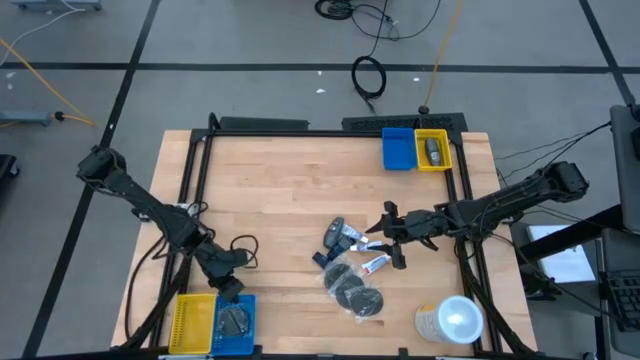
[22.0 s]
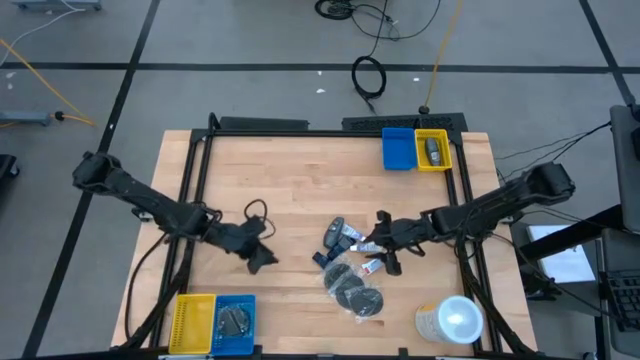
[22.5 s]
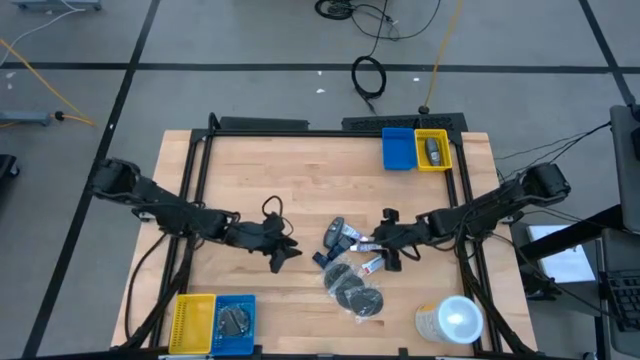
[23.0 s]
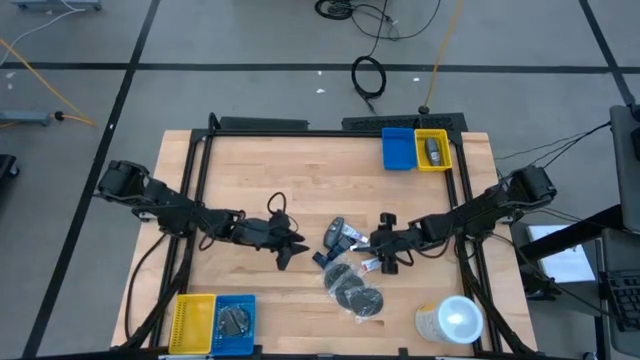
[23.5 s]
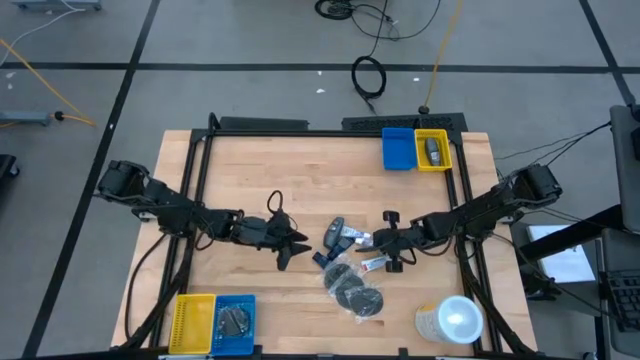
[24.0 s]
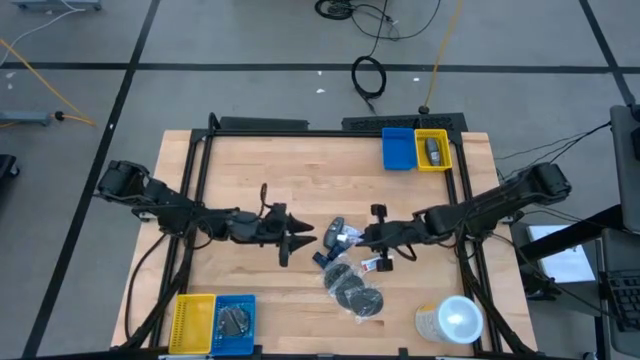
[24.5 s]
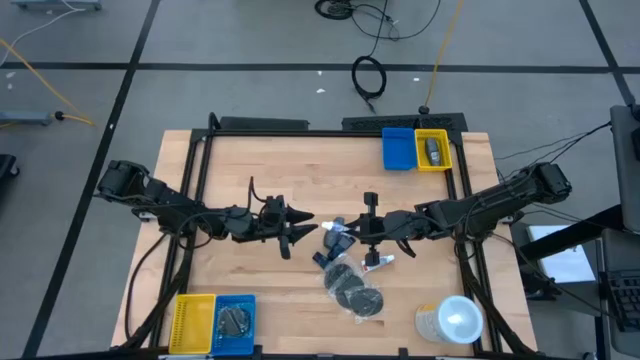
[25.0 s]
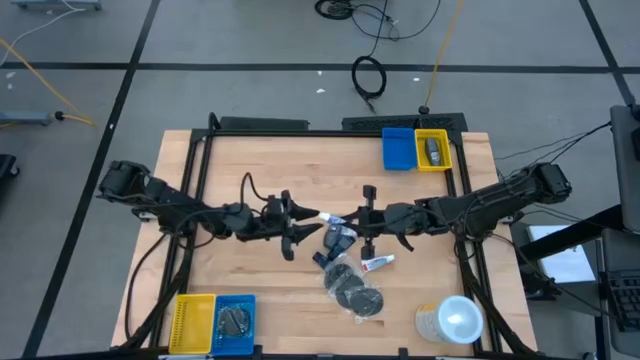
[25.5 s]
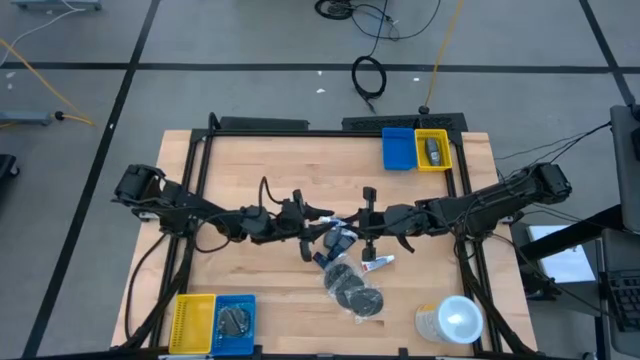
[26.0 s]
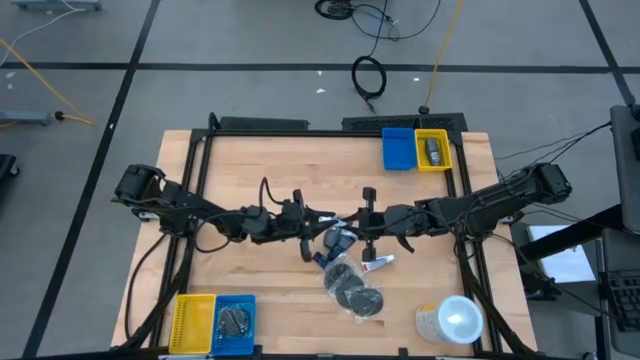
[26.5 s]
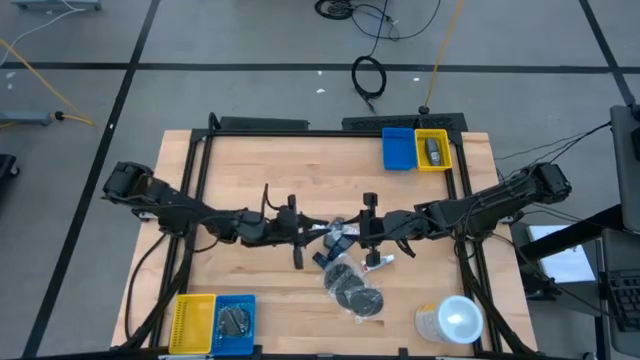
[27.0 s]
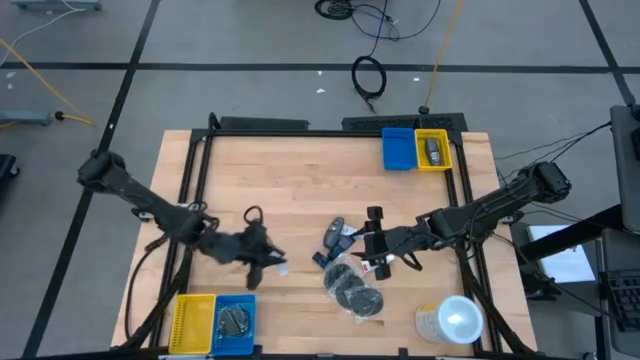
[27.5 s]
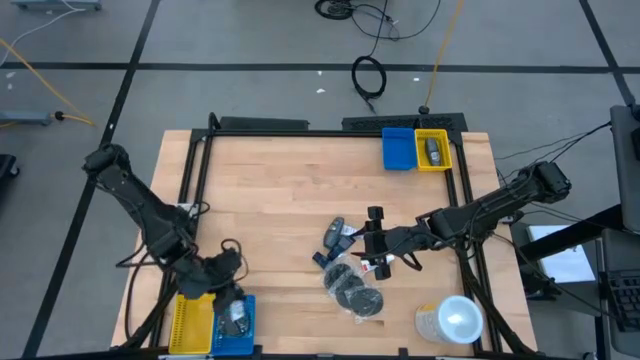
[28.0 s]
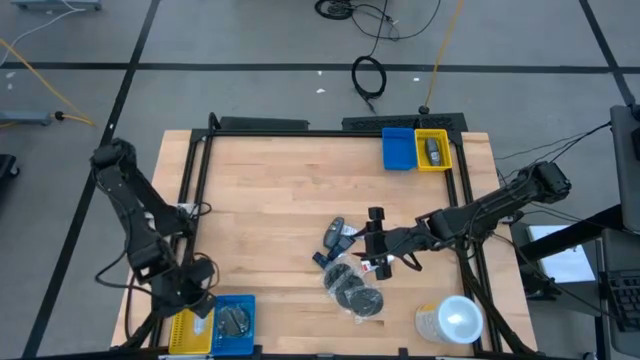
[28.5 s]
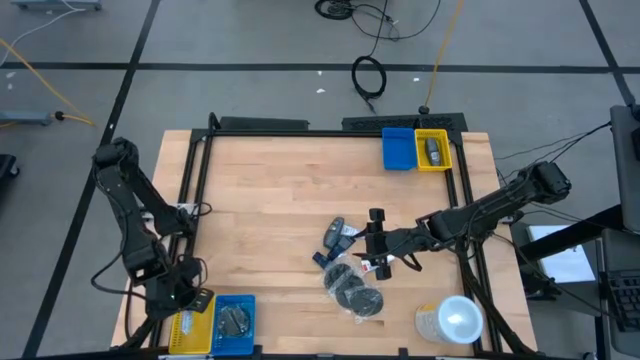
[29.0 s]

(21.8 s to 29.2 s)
Task: Pick & Place Travel size toiletries
Put the white toothpaste into the bottom yellow bin

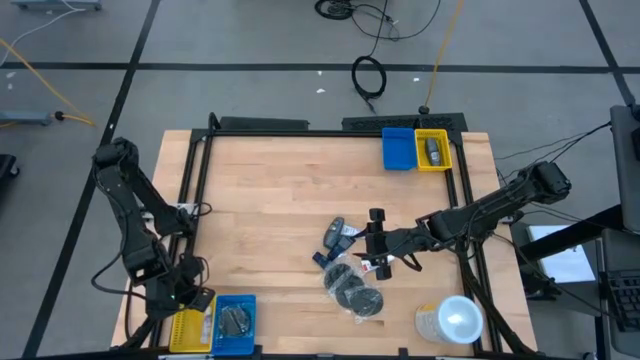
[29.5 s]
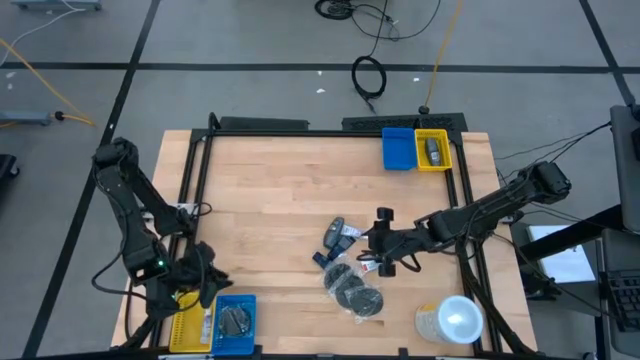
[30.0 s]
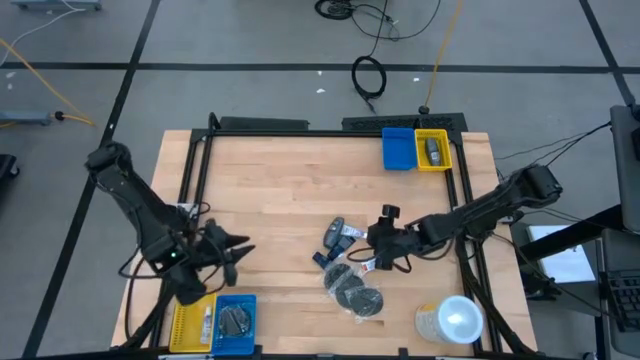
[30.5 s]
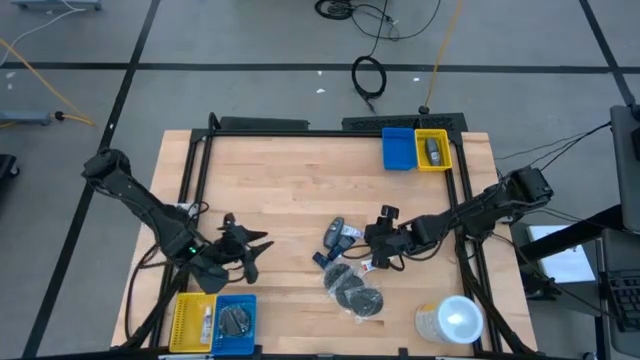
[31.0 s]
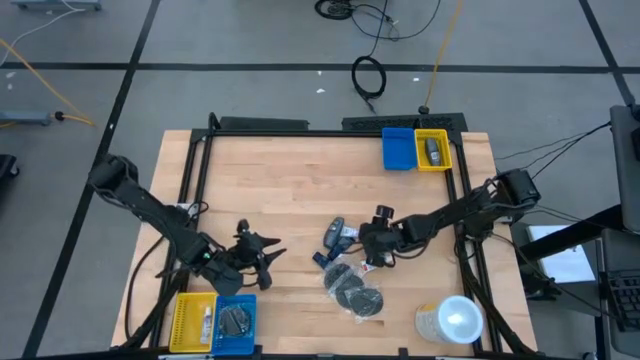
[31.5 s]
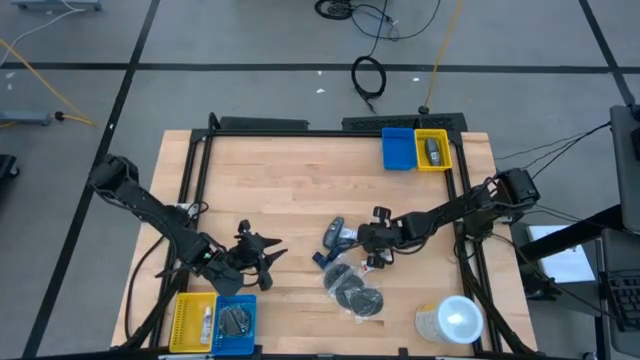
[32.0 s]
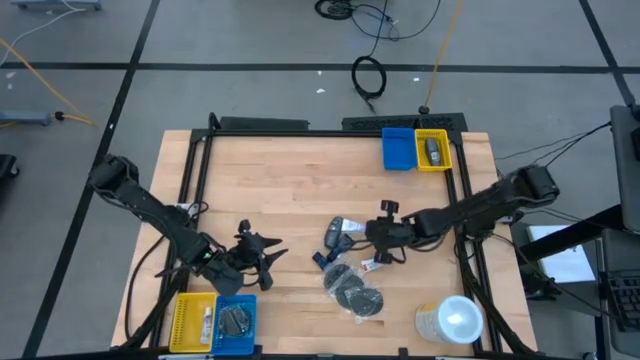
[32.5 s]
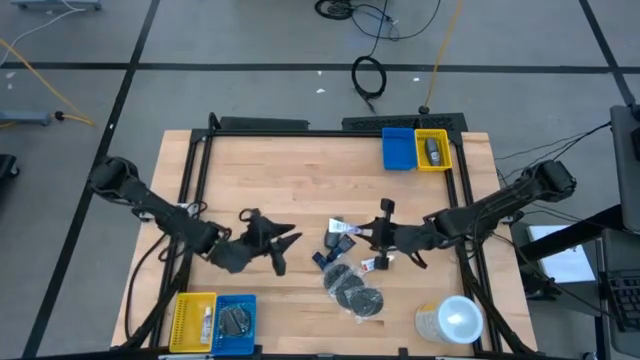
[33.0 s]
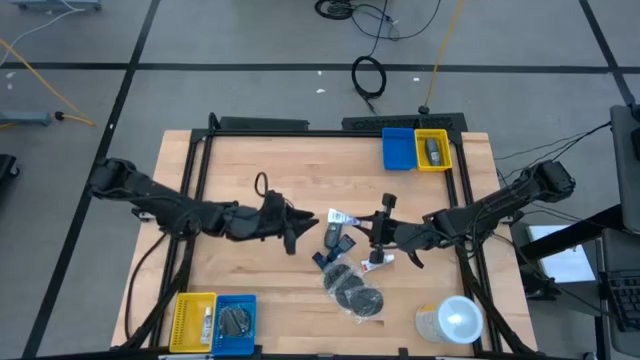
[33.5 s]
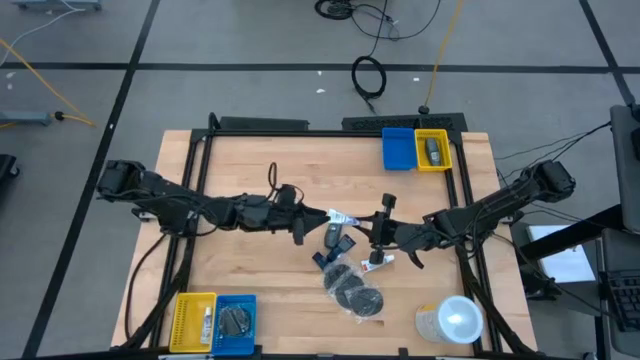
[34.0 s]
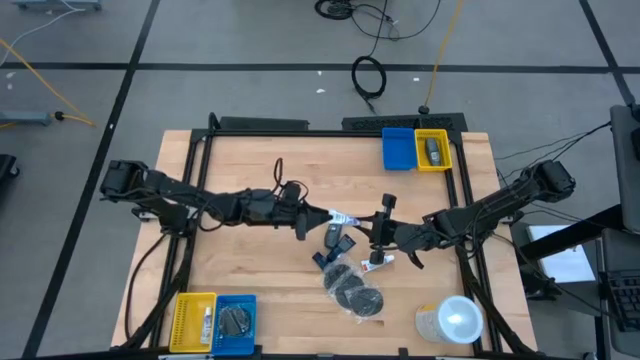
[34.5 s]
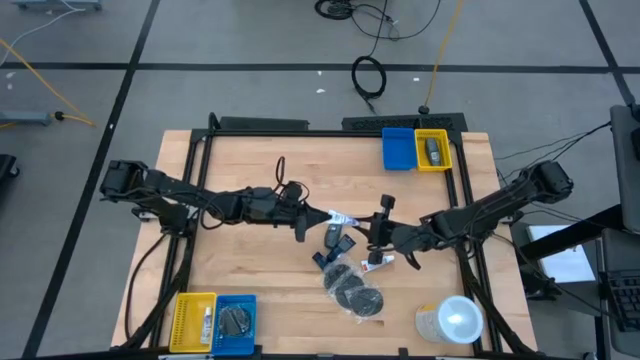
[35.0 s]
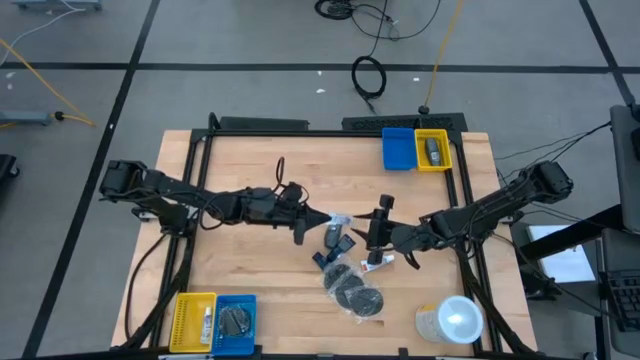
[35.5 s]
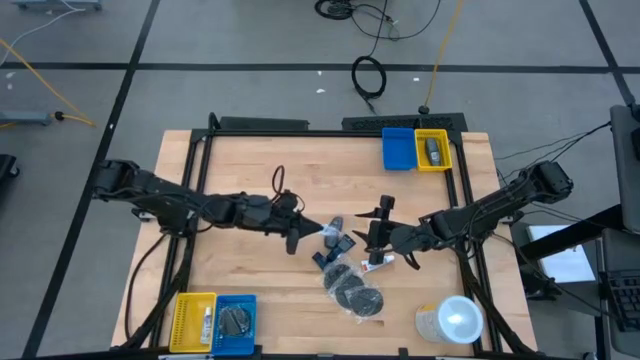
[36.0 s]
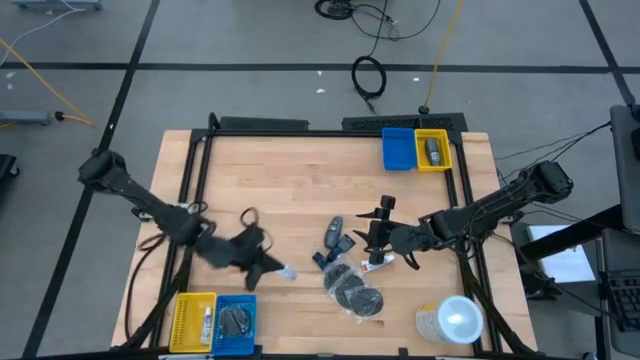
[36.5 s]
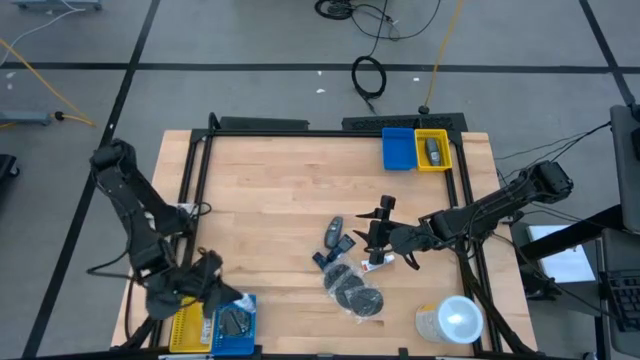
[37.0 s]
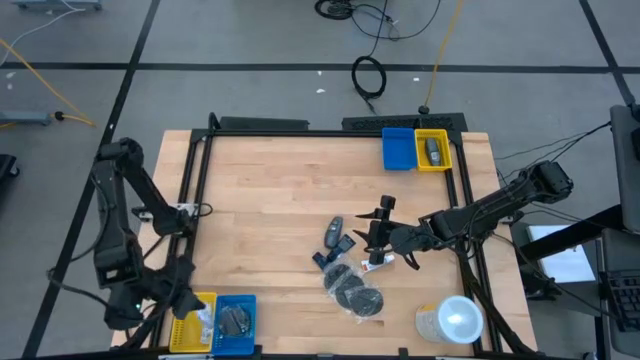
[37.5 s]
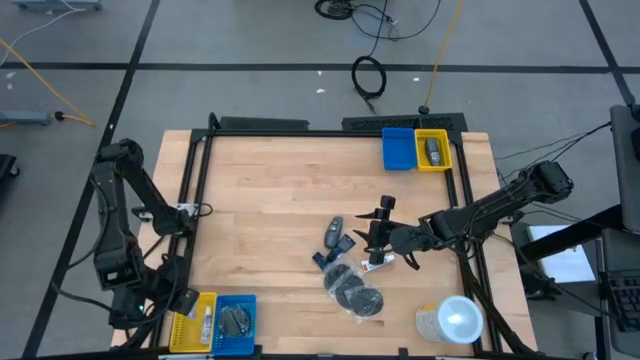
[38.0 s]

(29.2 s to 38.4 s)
Put the white toothpaste into the bottom yellow bin

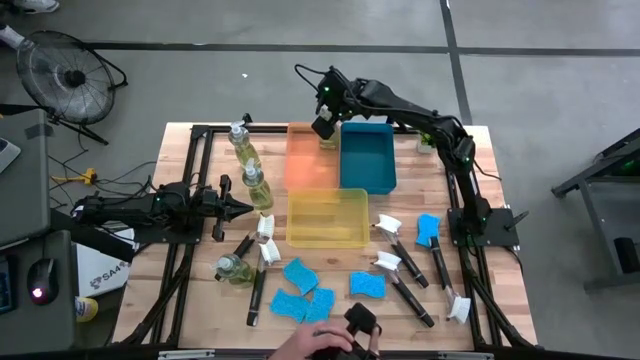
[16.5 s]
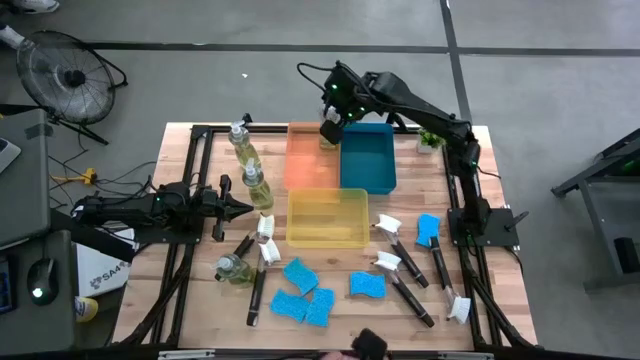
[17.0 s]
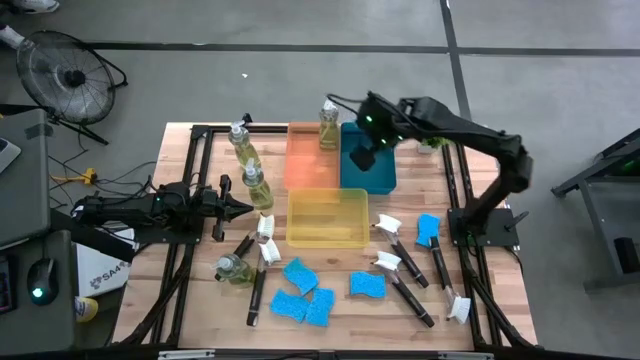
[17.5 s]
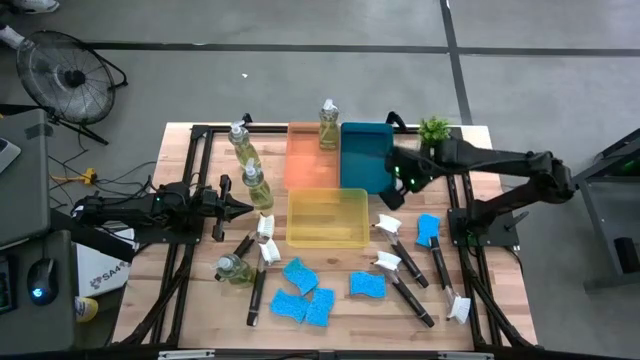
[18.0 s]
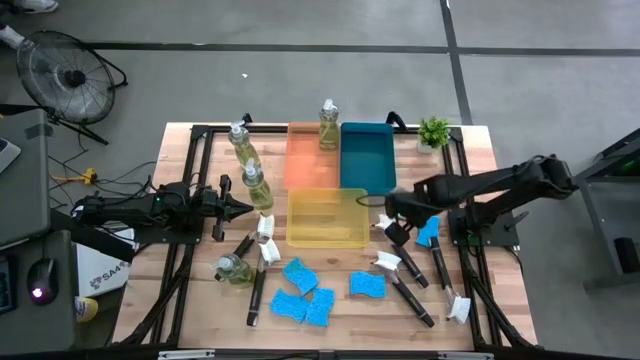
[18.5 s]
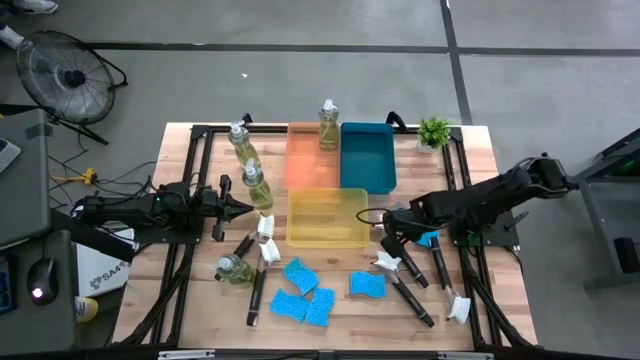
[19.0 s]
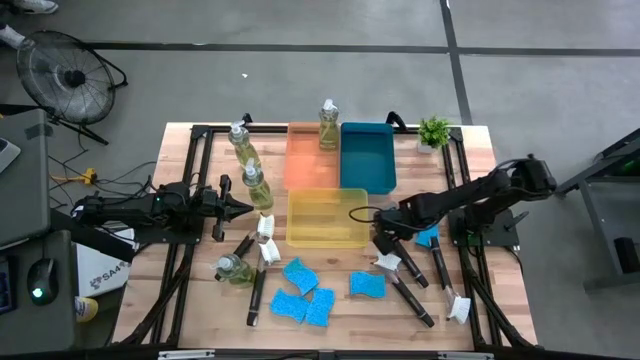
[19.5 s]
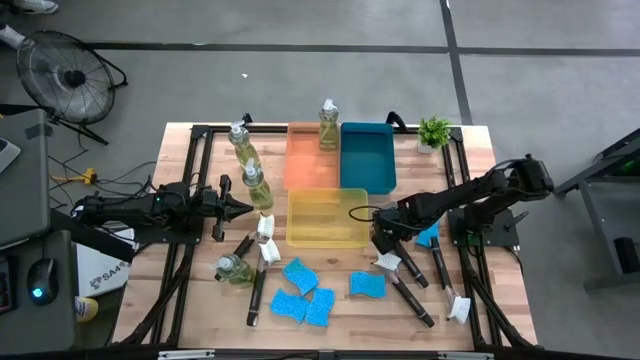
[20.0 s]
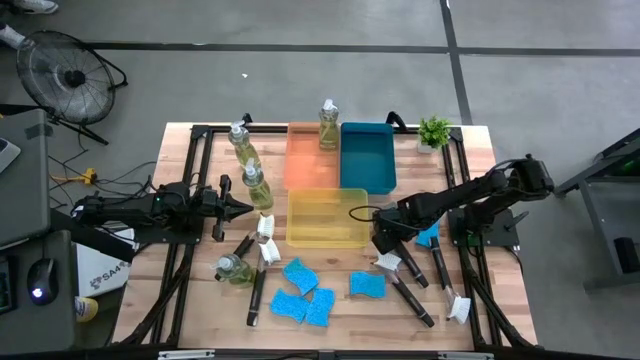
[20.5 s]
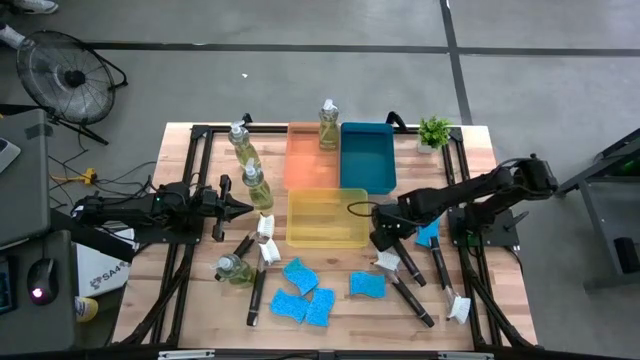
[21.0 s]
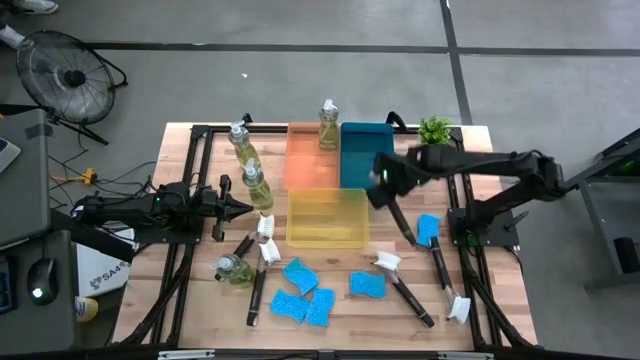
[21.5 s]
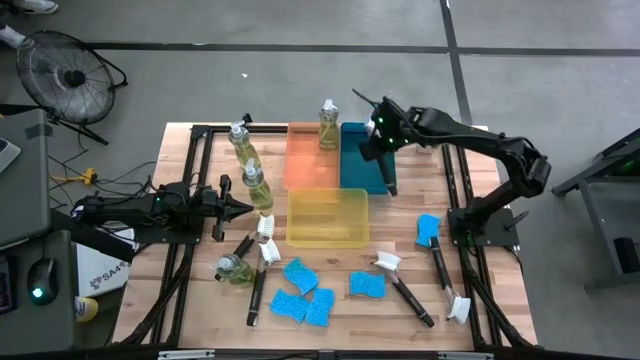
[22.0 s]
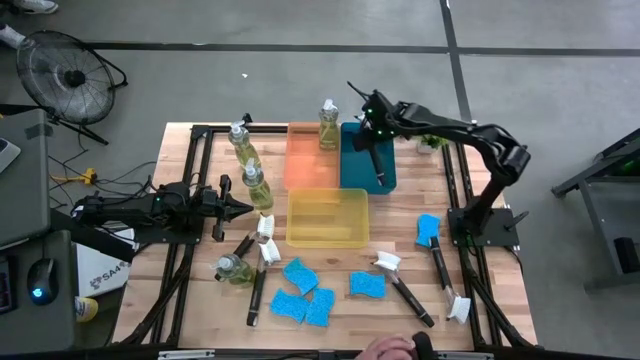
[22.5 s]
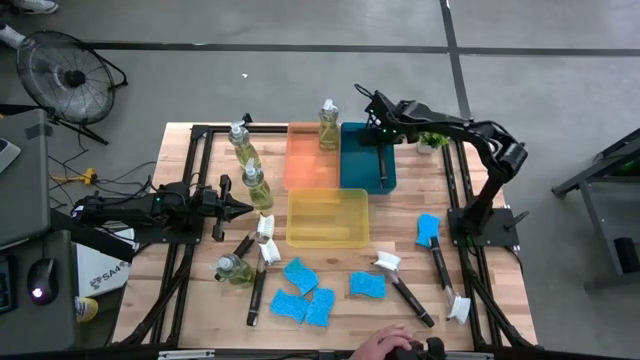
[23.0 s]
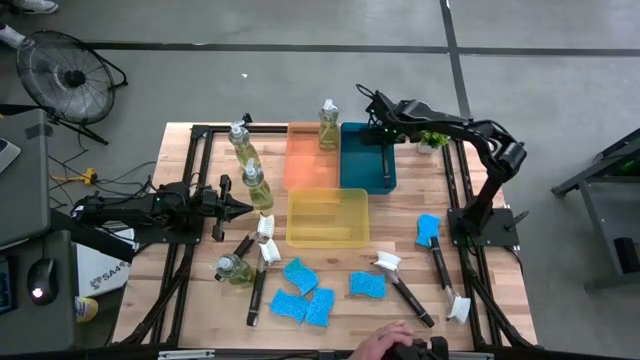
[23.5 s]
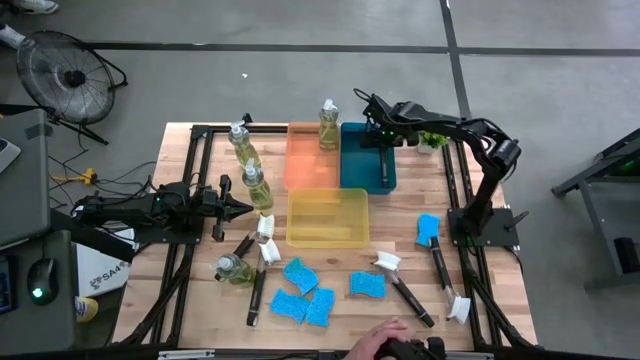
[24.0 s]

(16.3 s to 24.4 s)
Task: Pick & Place Kitchen Sink Supplies
Put the dish brush into the blue bin
